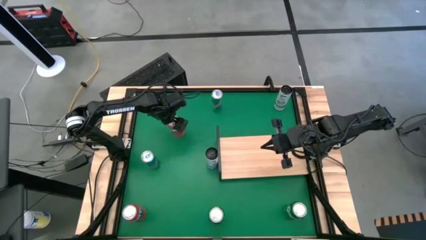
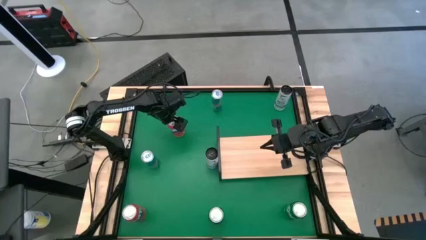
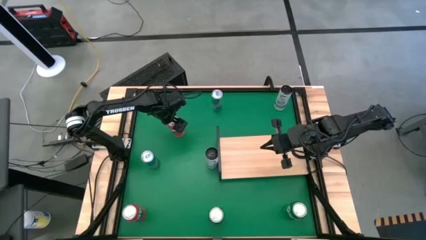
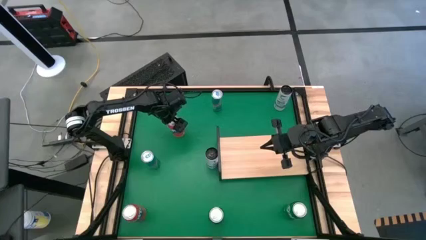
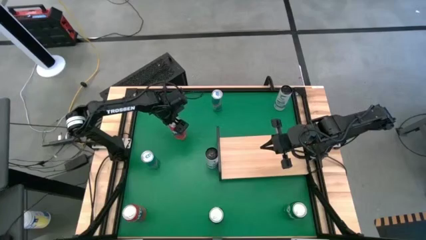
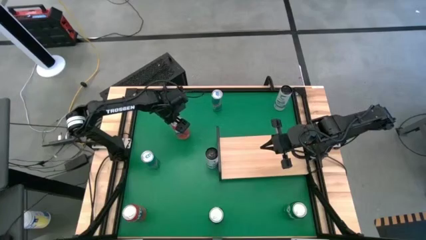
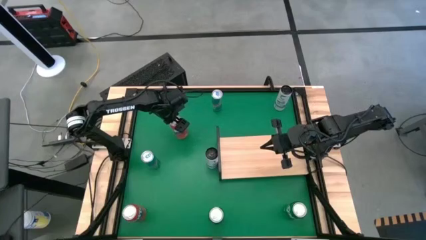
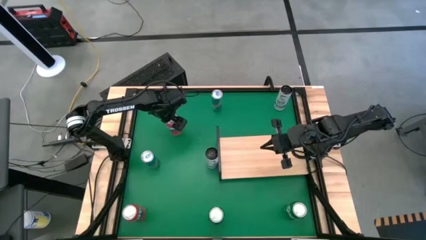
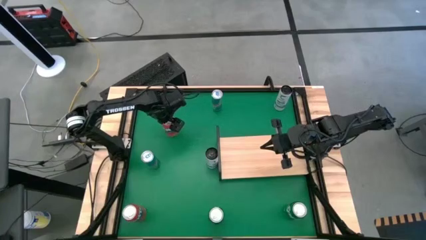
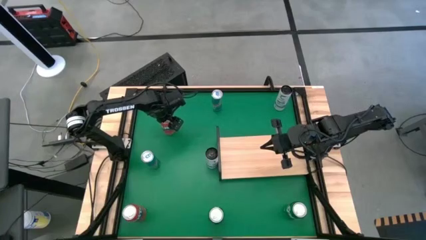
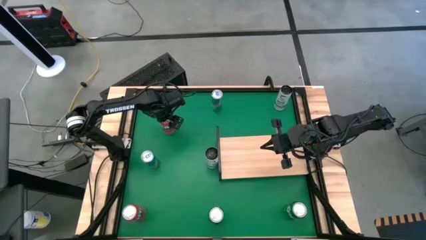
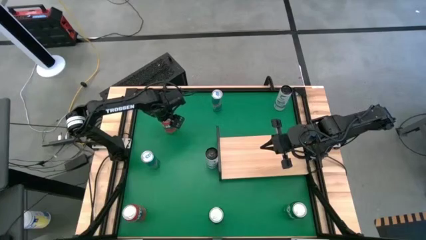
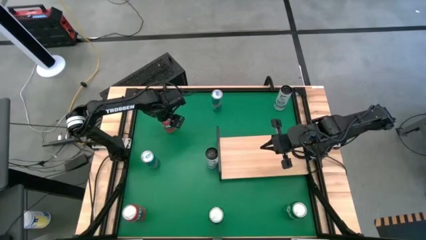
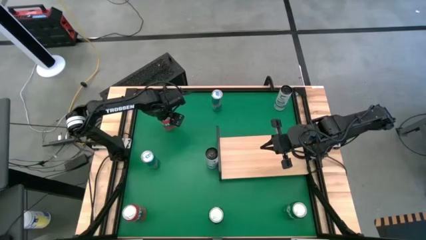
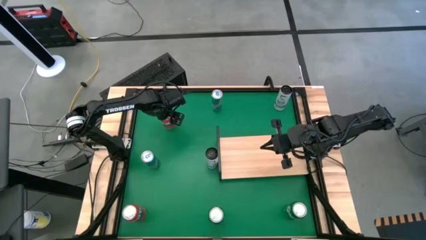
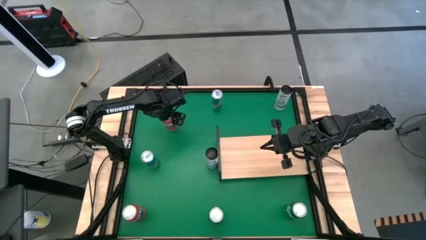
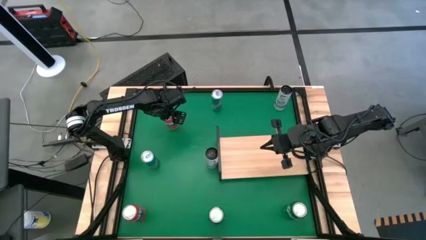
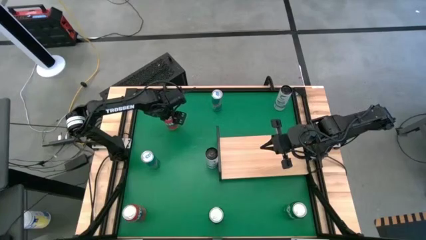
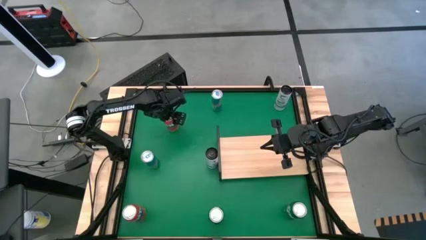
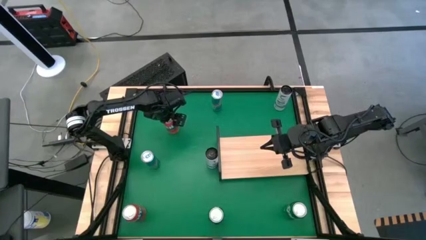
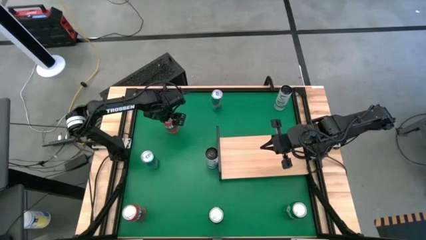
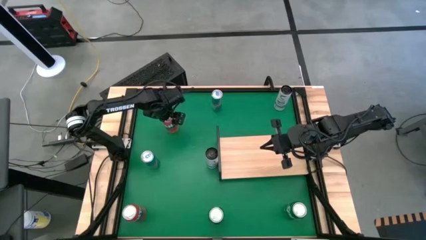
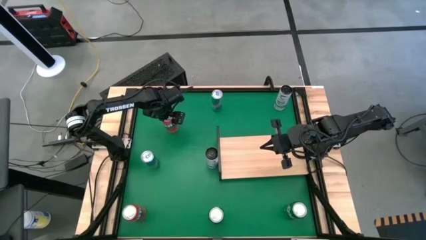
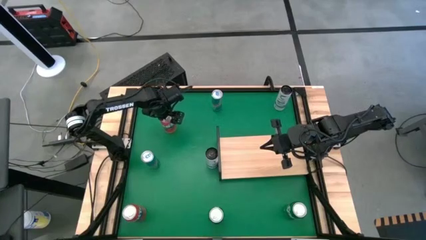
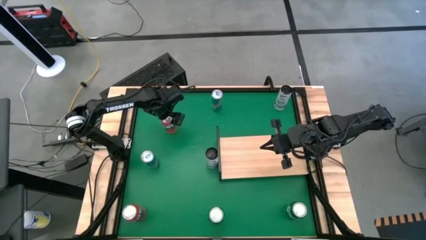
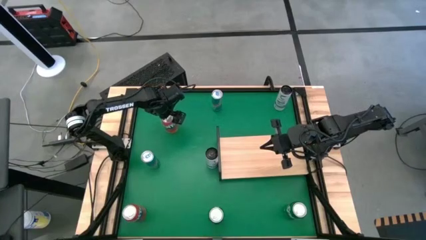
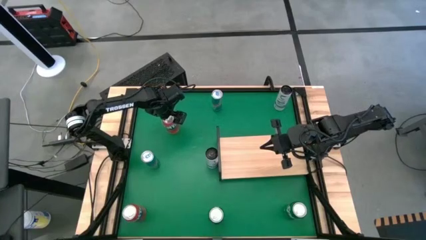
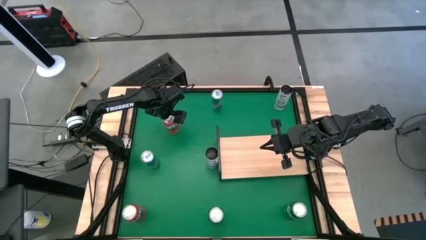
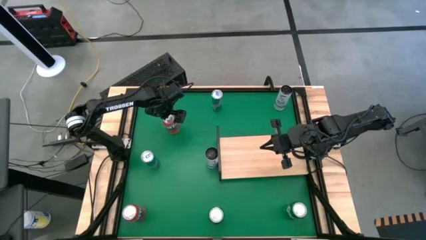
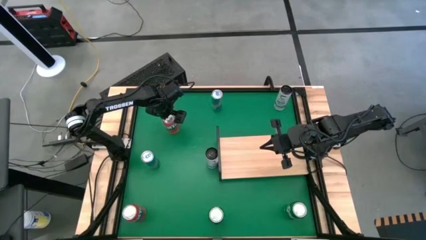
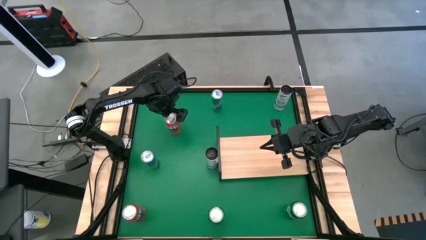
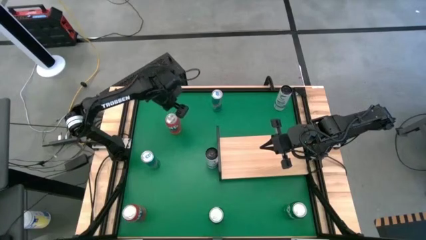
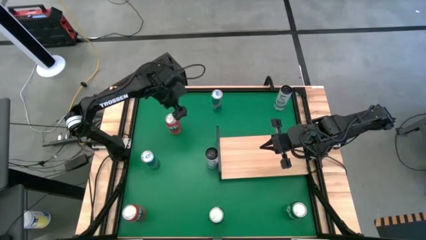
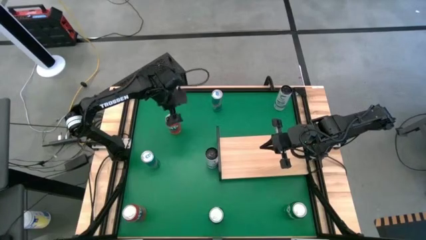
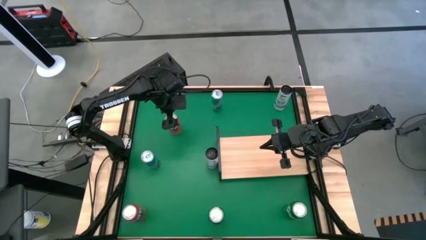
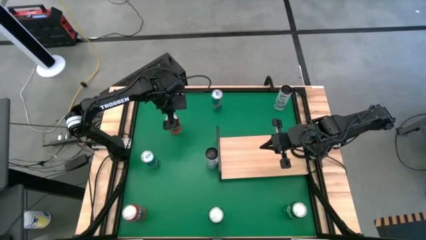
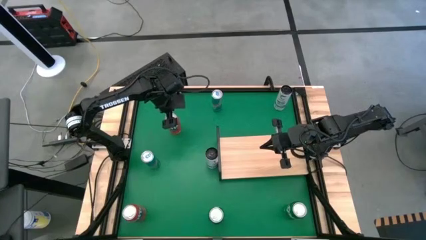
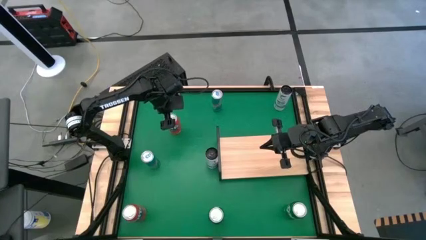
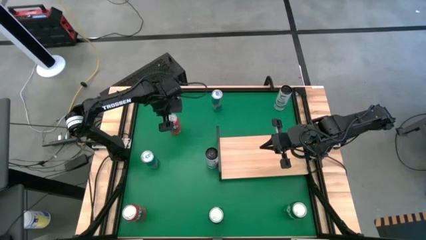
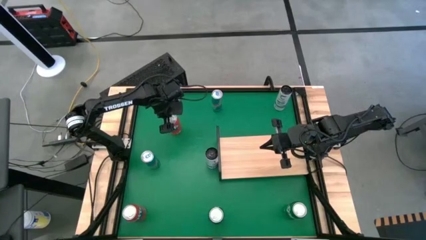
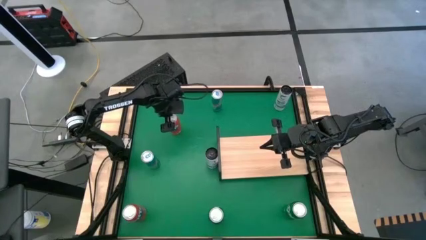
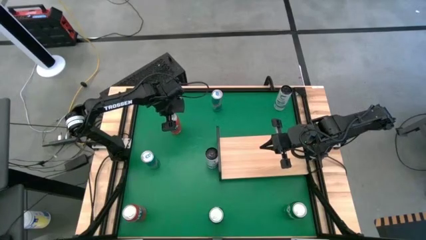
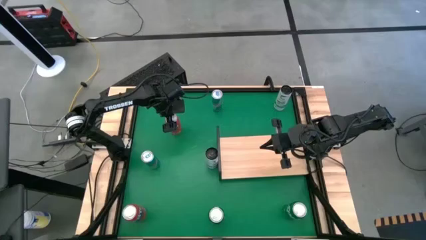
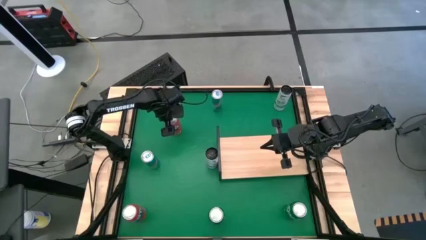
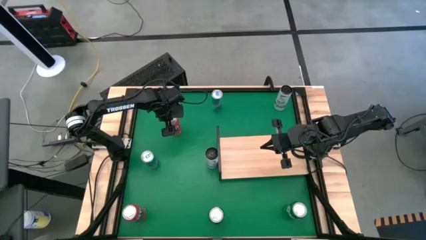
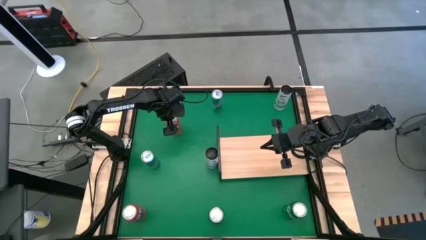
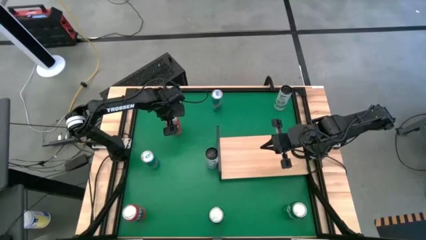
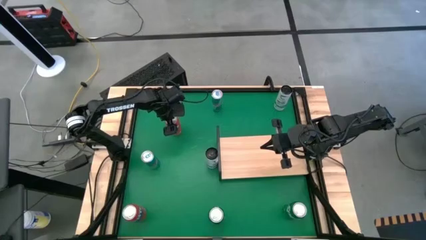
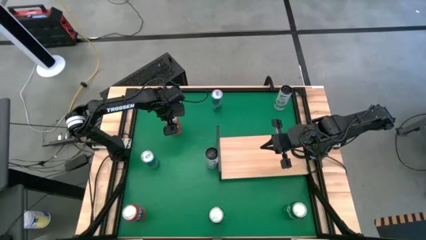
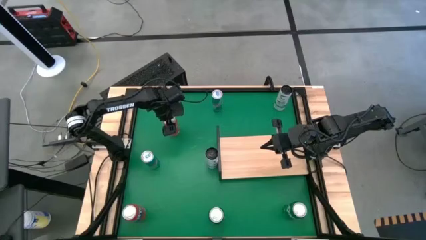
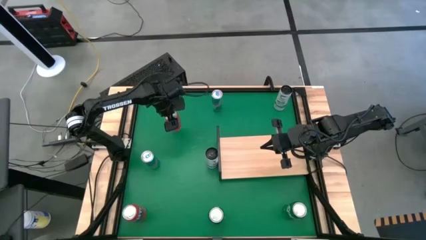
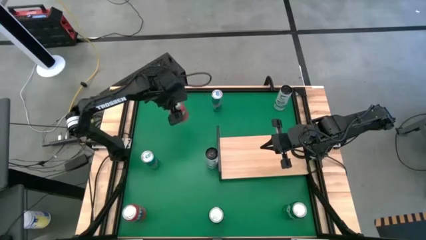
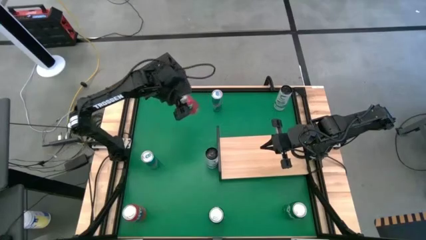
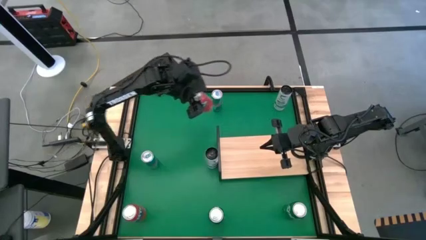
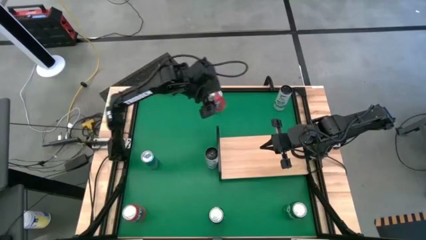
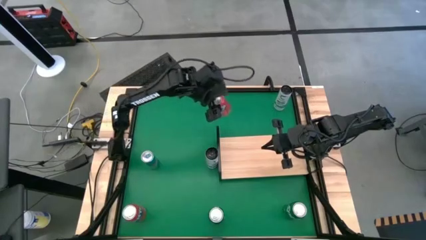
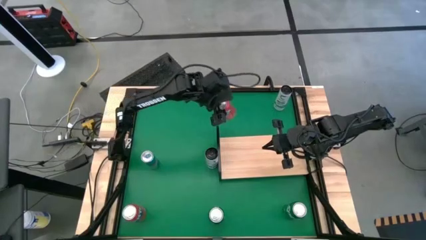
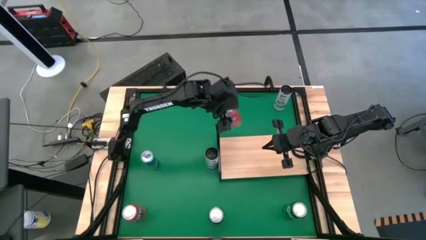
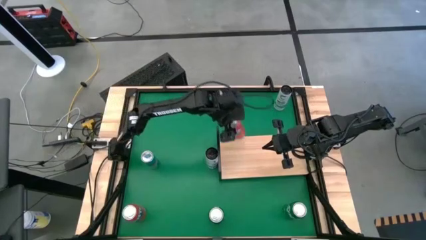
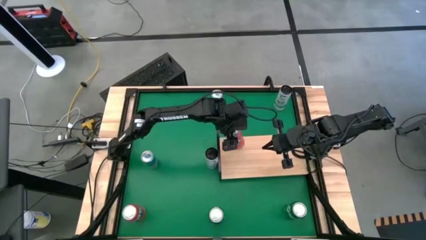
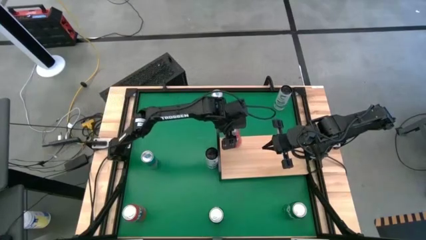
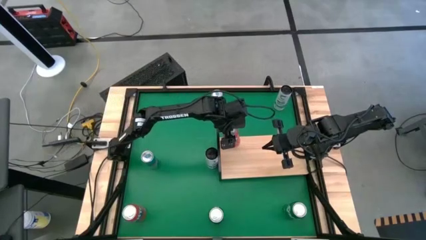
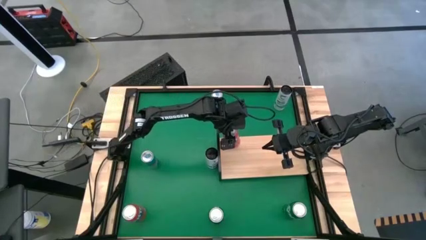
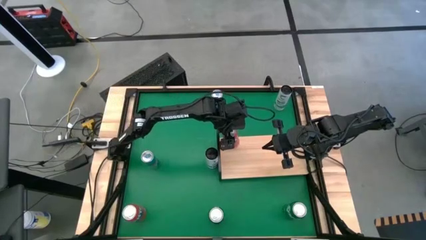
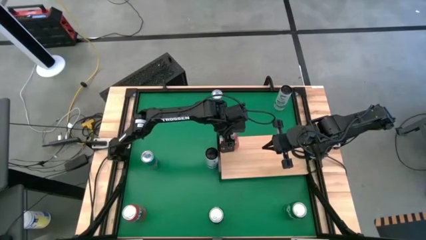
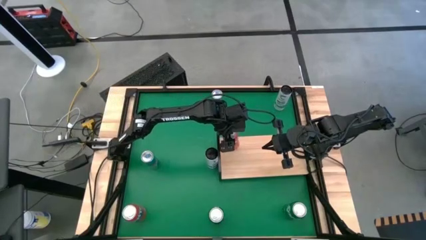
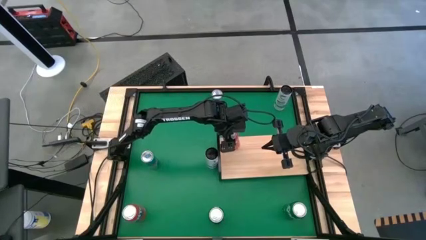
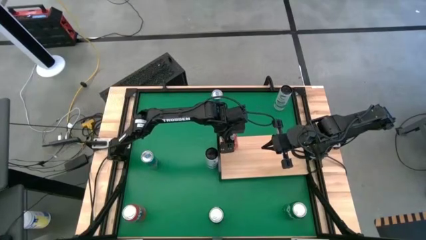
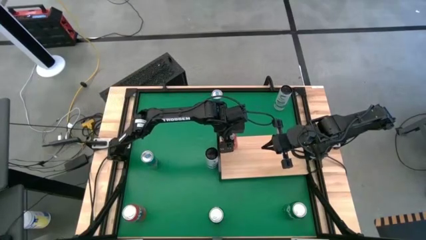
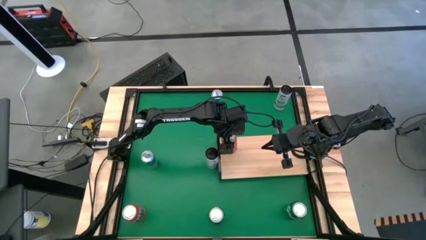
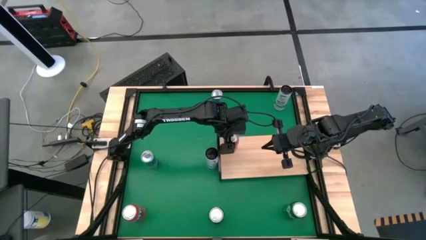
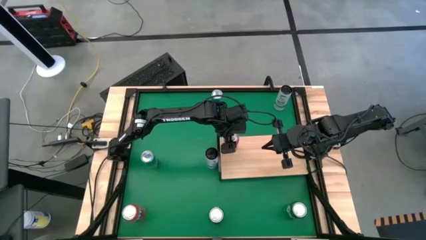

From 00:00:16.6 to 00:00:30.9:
Task: Place canned beverage on shelf
Put the top orange soda can on the shelf

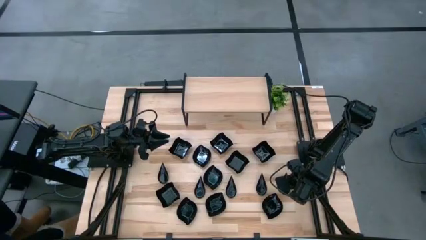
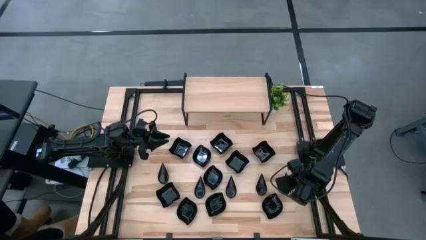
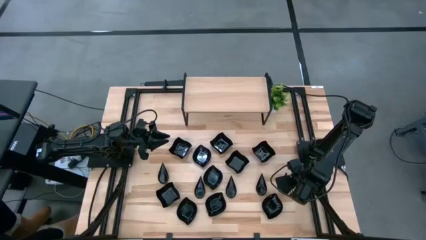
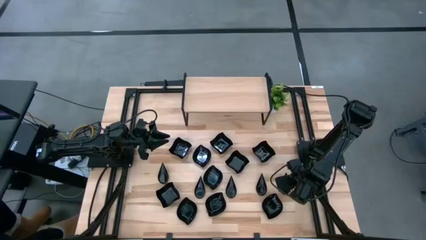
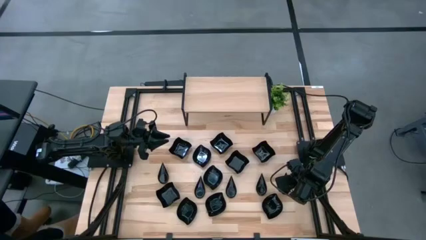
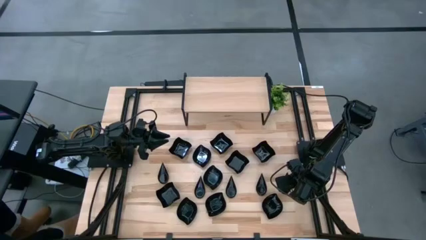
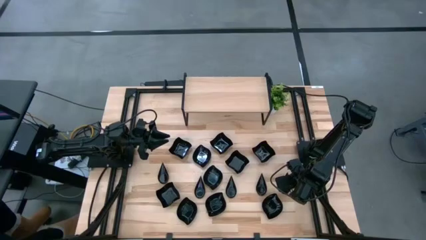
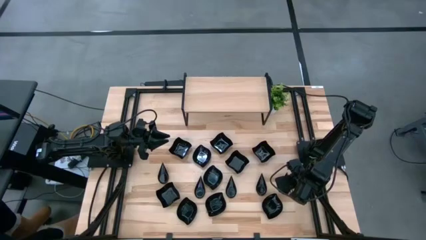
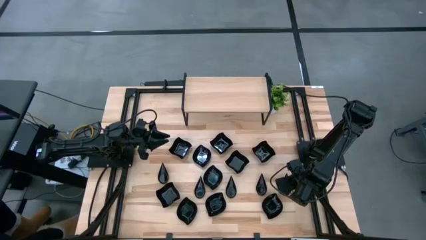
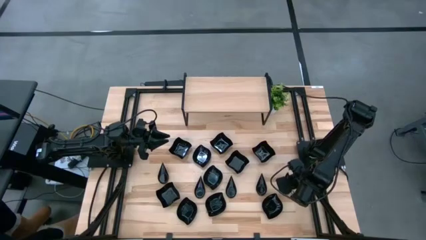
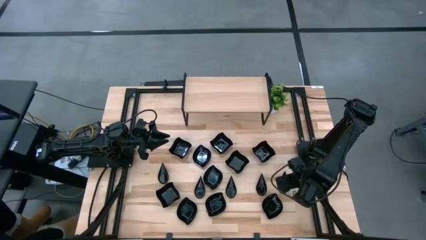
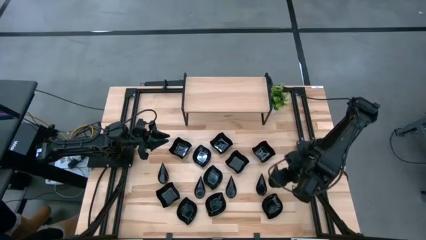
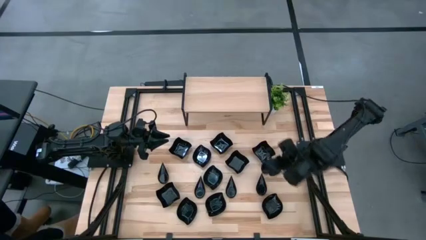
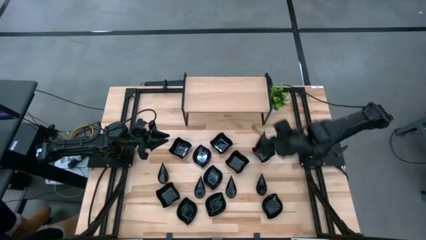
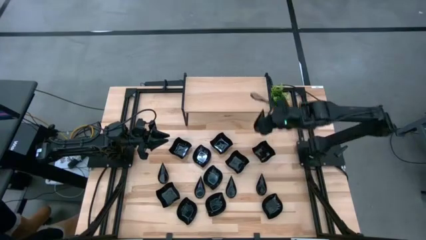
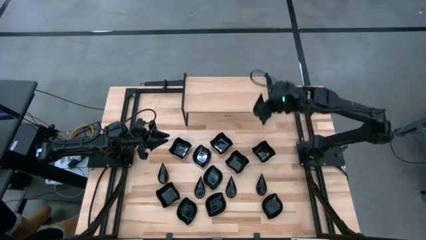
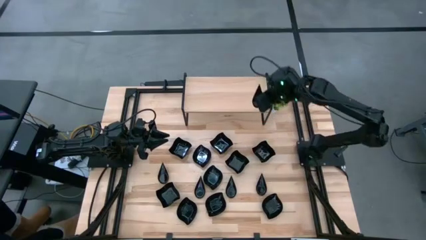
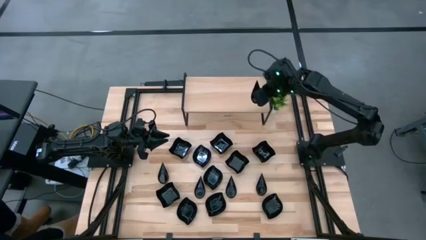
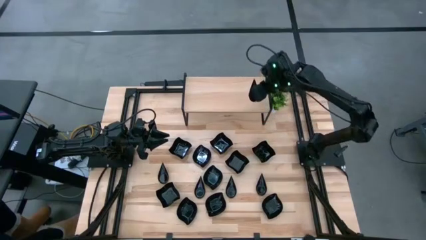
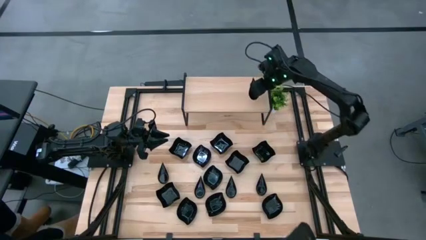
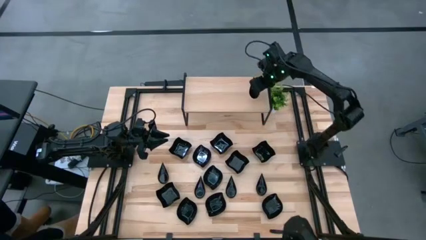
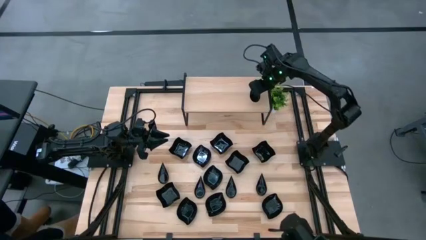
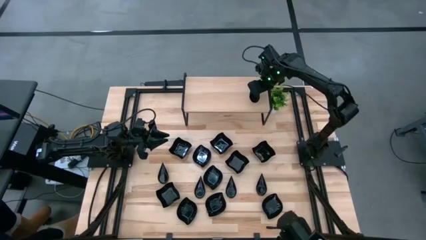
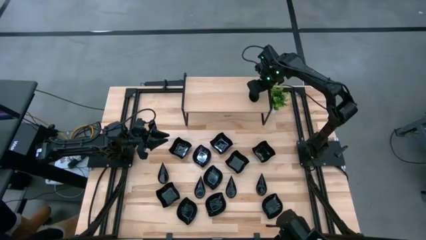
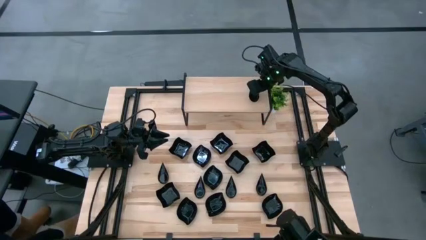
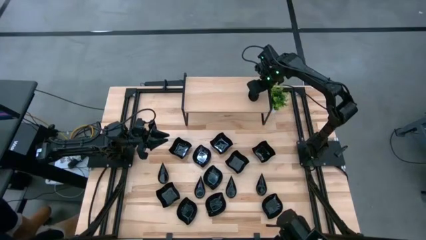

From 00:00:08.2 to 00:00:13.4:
Task: Pick & Place Mini shaped plates
Put the black drop shaped plate on the shelf
